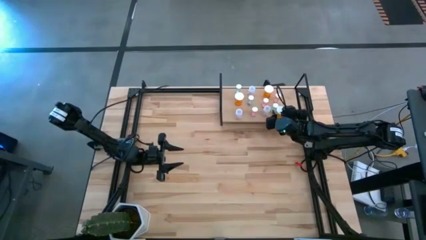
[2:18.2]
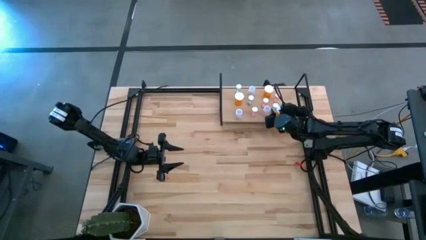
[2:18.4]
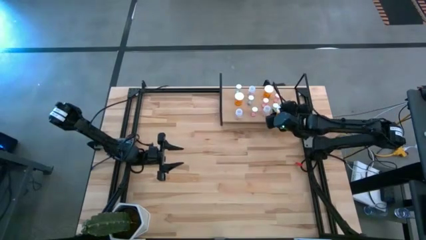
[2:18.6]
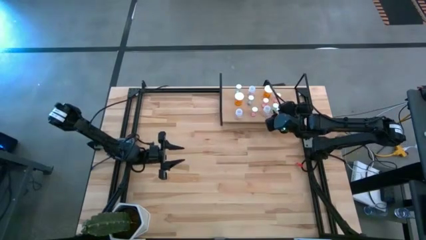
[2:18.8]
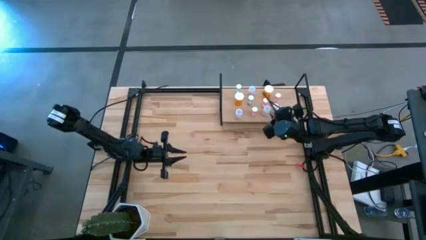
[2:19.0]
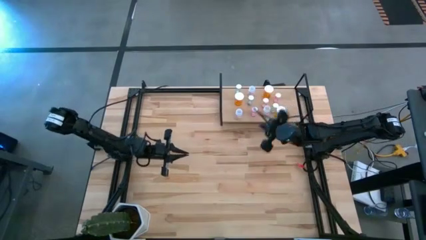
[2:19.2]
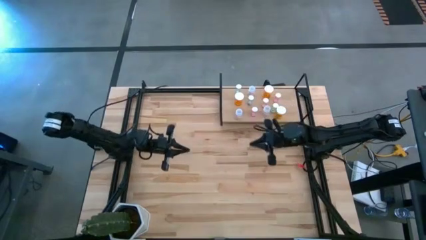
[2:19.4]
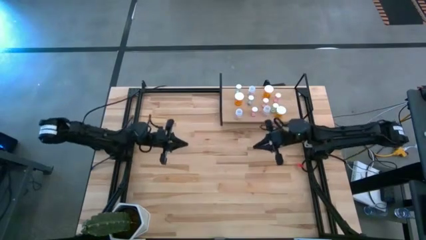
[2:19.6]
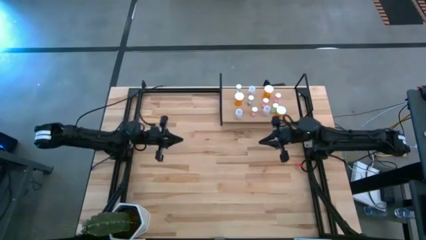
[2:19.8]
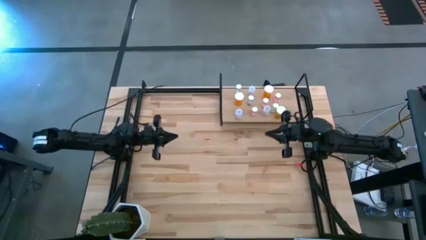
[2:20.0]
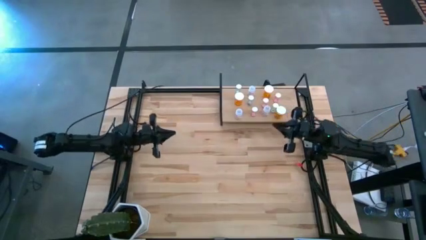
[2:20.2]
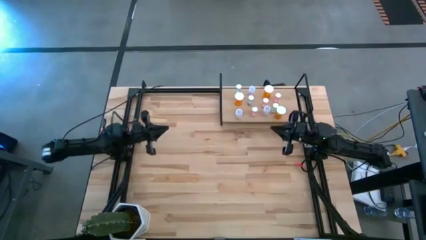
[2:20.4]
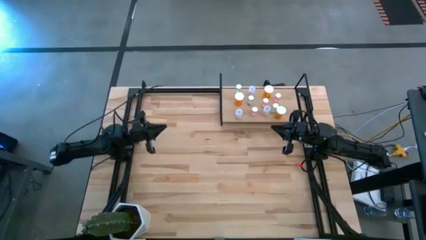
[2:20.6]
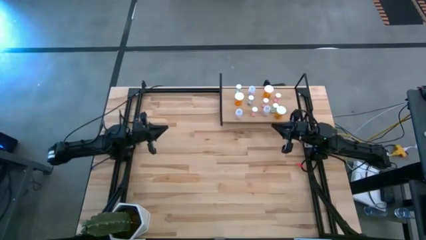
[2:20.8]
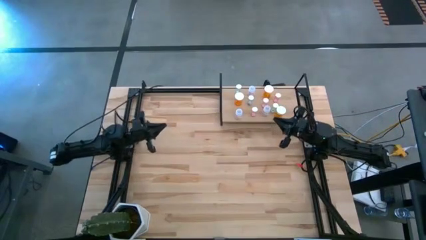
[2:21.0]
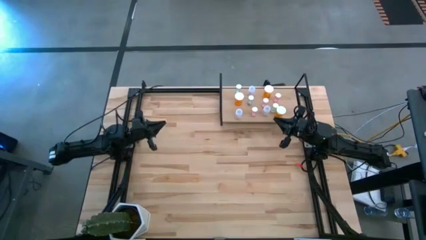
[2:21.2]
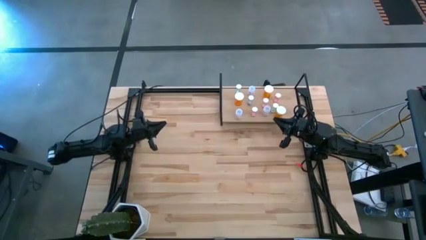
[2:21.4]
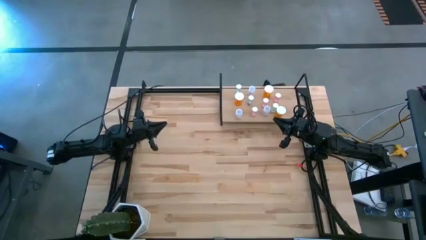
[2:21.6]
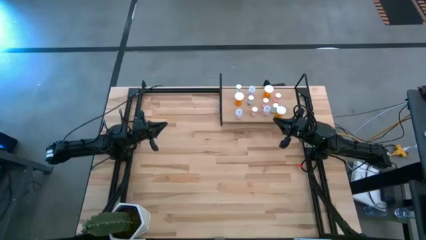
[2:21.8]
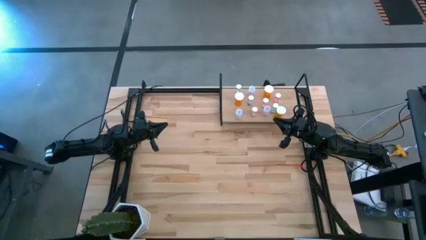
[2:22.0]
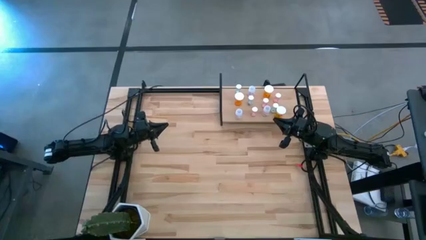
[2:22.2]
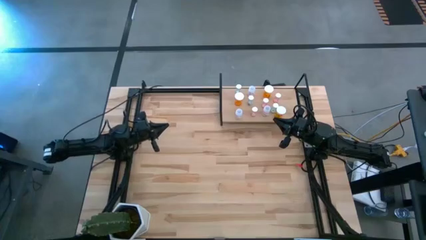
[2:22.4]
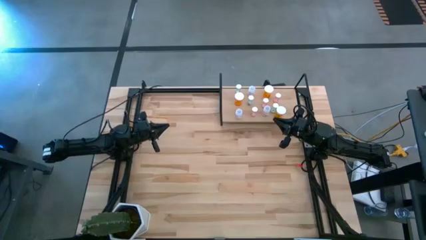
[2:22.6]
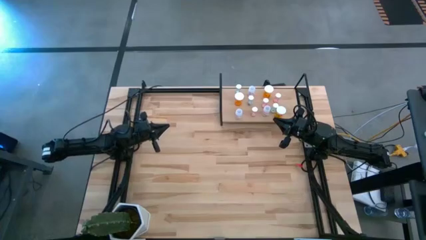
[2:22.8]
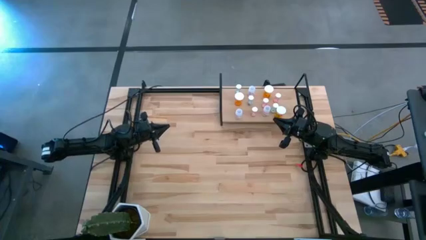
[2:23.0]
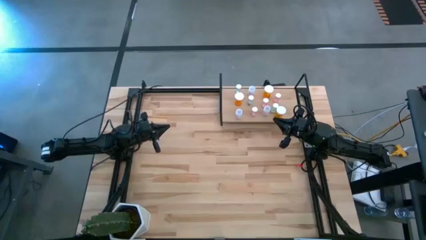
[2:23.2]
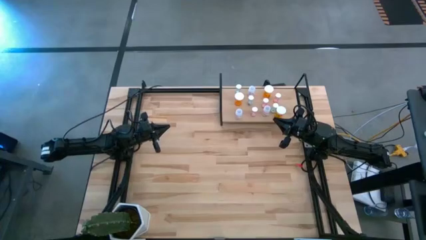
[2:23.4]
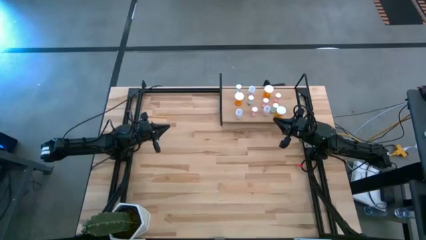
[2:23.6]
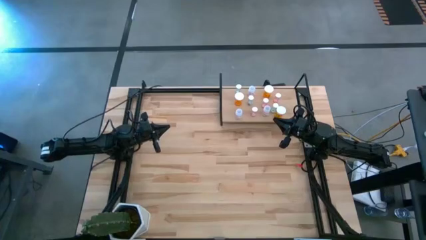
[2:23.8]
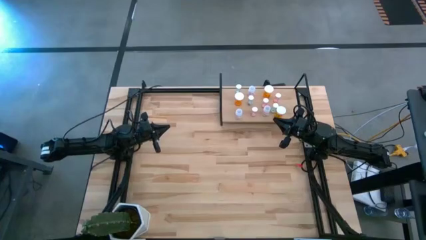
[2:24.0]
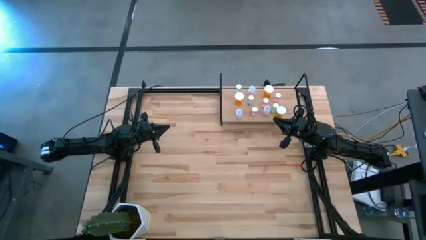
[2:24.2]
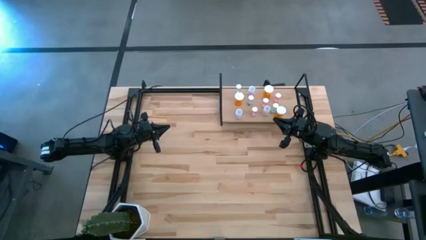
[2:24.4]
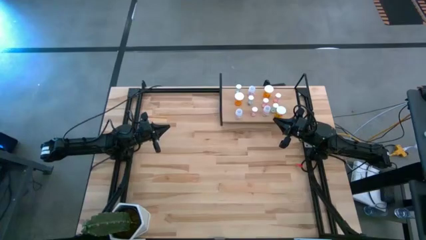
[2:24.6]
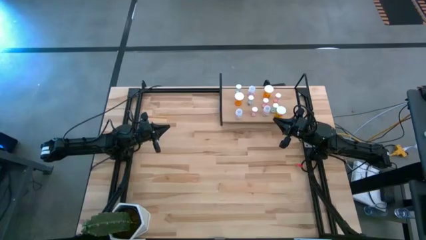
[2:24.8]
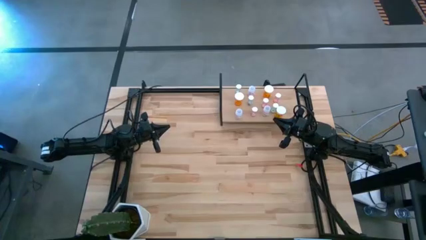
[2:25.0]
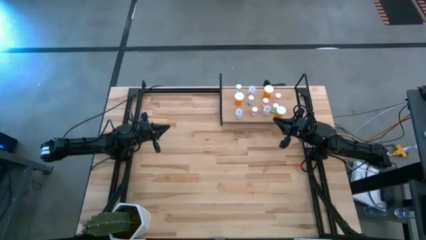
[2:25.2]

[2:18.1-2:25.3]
Task: Pick and place medicine bottles onto shelf by color
Return to Home Position

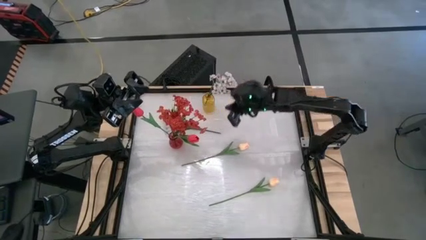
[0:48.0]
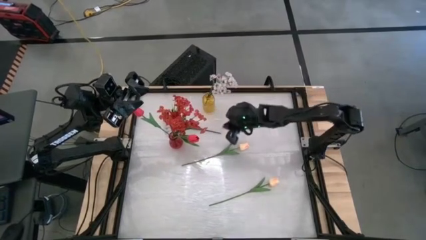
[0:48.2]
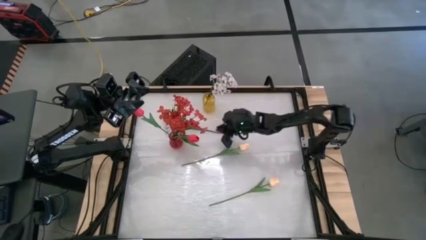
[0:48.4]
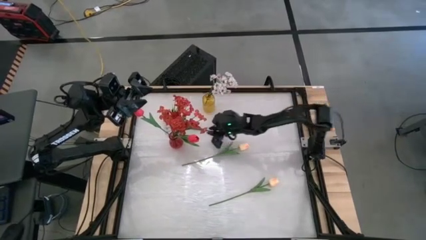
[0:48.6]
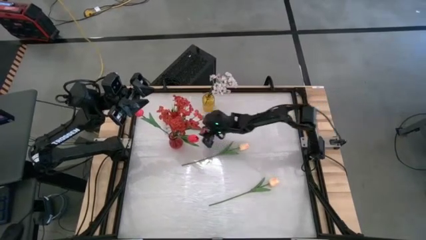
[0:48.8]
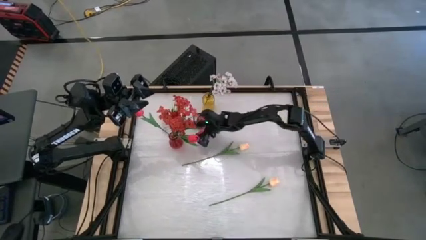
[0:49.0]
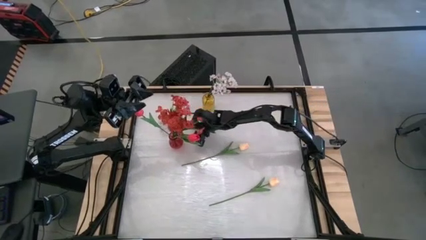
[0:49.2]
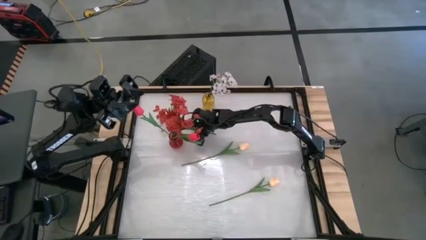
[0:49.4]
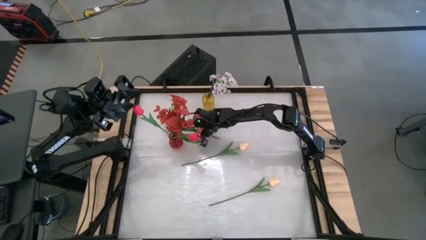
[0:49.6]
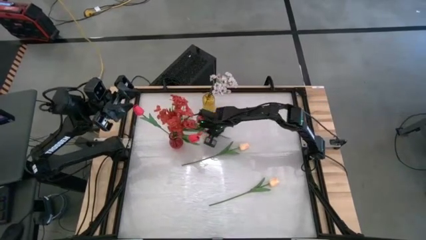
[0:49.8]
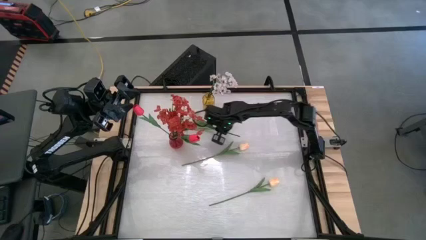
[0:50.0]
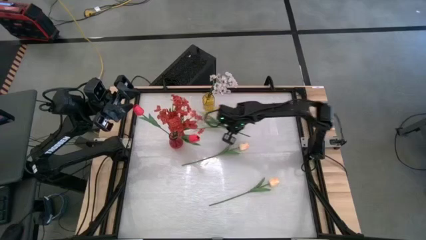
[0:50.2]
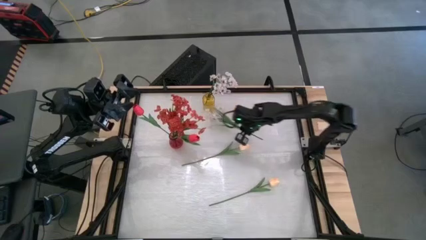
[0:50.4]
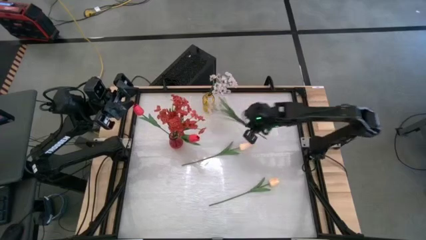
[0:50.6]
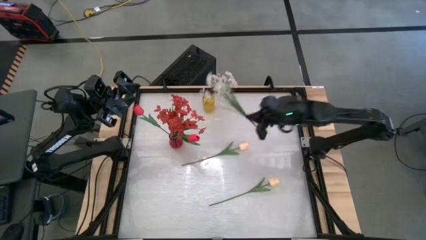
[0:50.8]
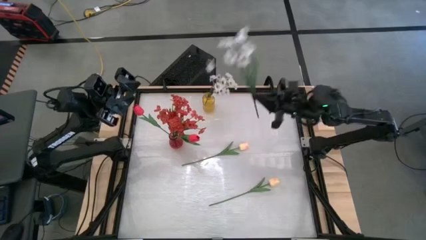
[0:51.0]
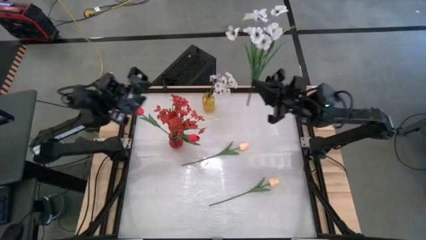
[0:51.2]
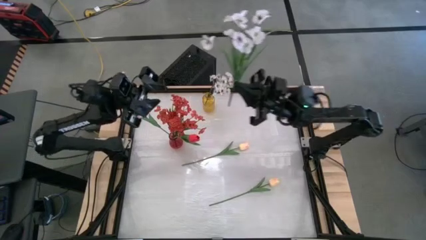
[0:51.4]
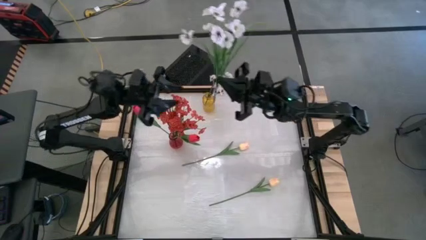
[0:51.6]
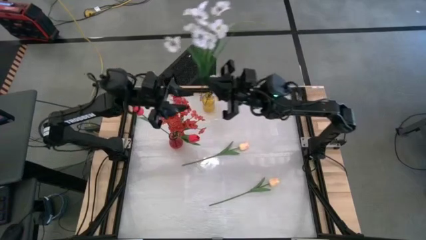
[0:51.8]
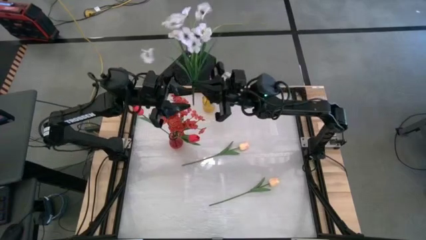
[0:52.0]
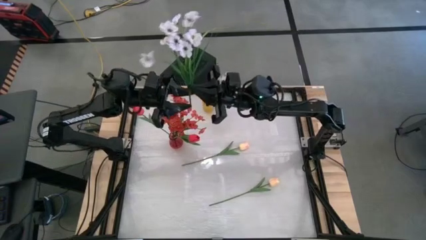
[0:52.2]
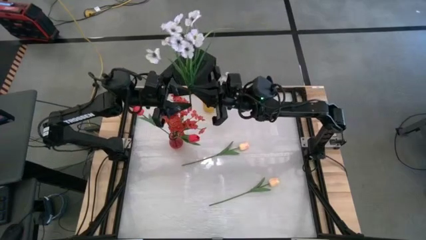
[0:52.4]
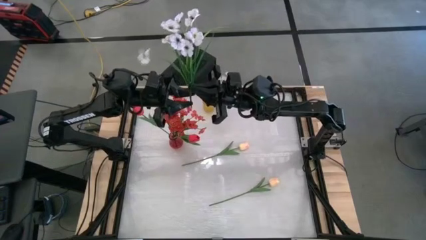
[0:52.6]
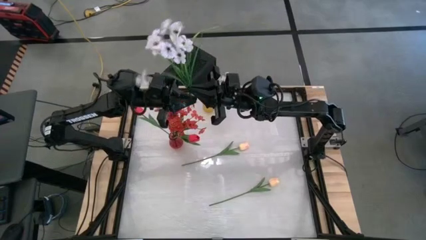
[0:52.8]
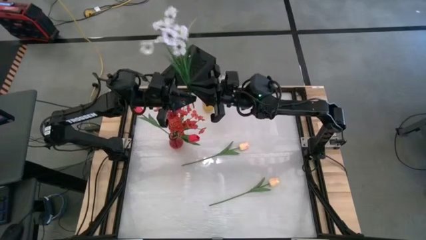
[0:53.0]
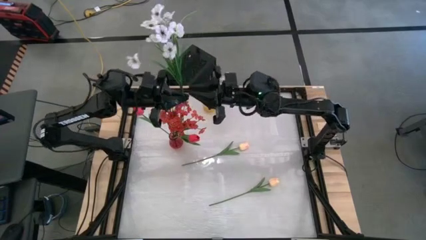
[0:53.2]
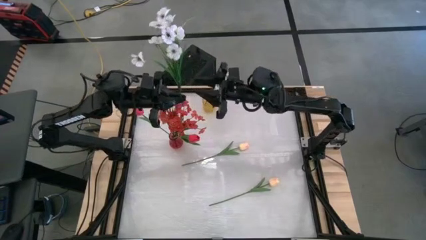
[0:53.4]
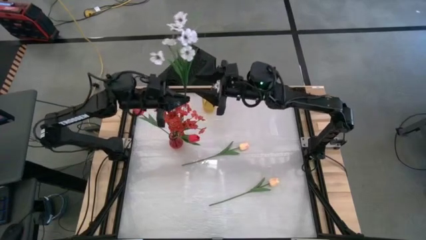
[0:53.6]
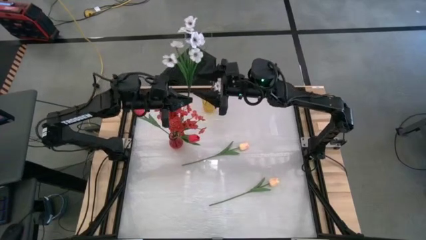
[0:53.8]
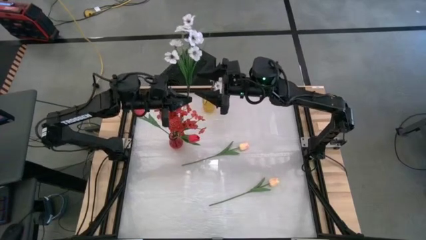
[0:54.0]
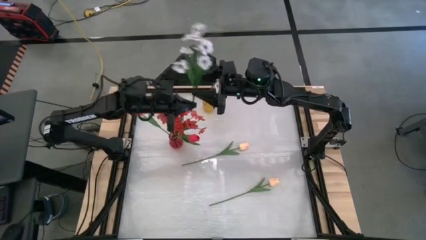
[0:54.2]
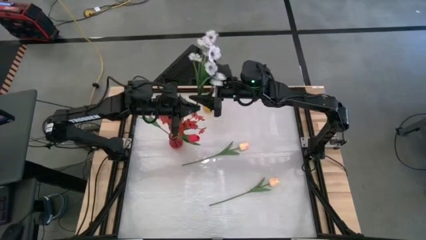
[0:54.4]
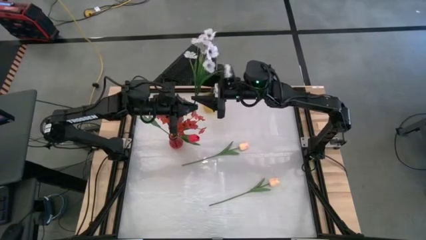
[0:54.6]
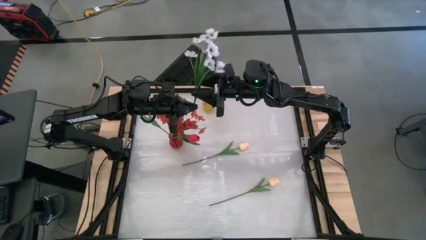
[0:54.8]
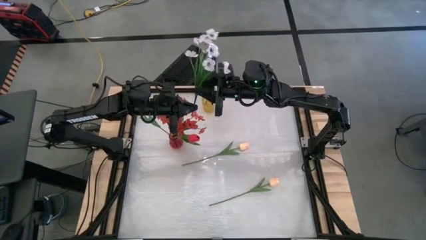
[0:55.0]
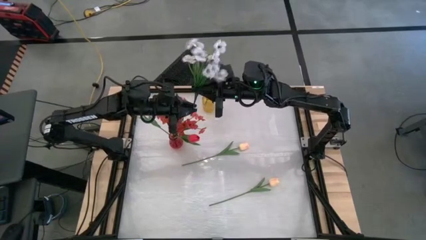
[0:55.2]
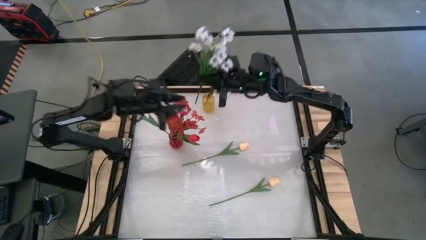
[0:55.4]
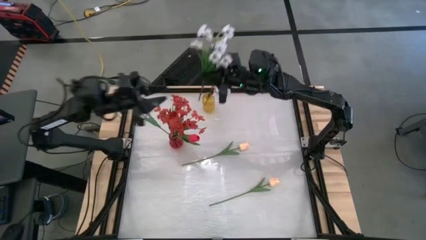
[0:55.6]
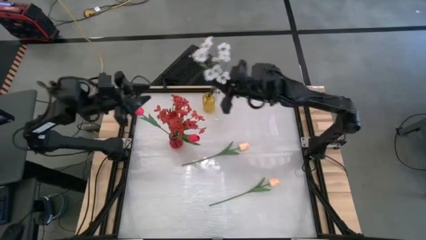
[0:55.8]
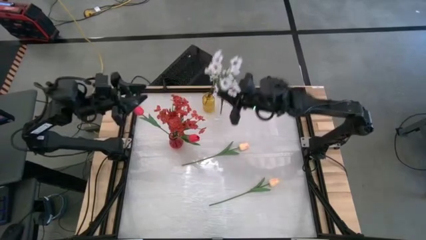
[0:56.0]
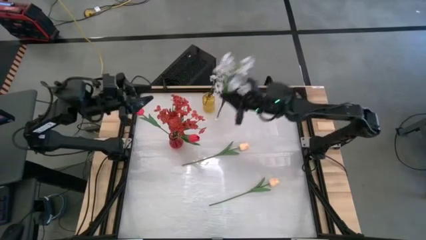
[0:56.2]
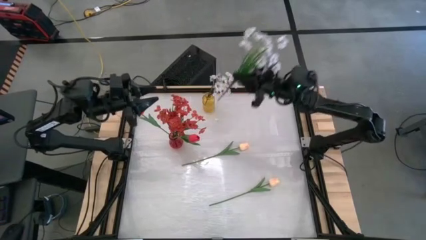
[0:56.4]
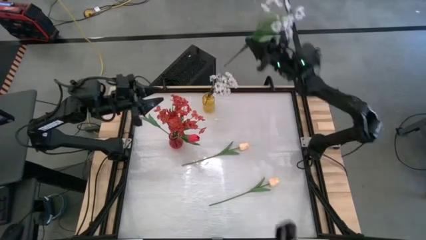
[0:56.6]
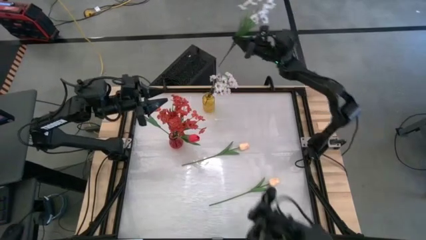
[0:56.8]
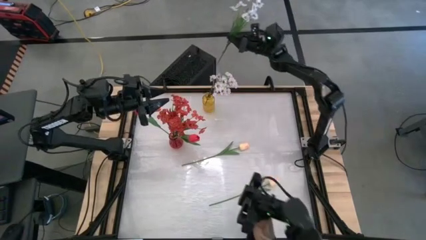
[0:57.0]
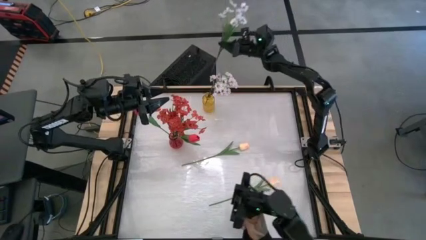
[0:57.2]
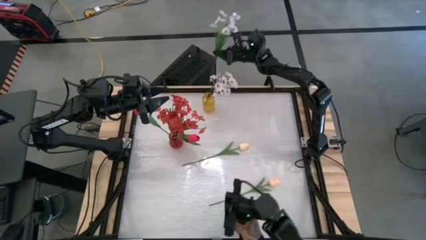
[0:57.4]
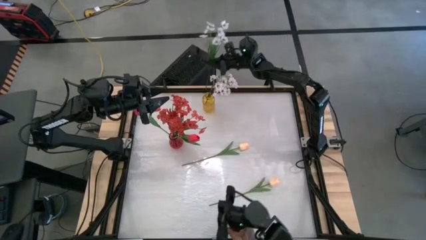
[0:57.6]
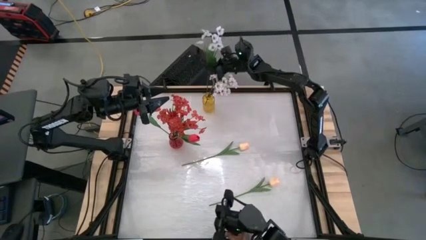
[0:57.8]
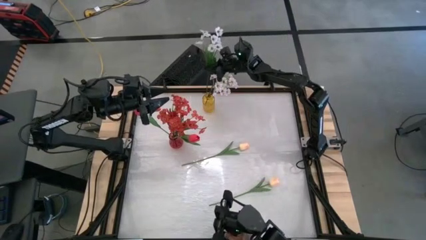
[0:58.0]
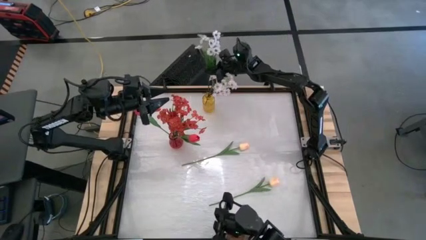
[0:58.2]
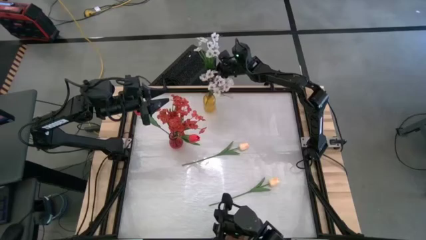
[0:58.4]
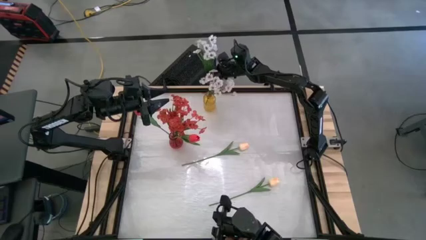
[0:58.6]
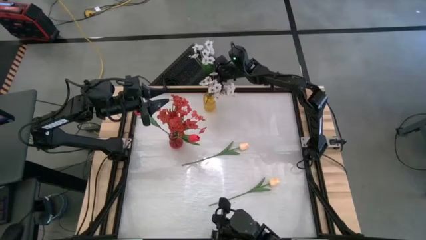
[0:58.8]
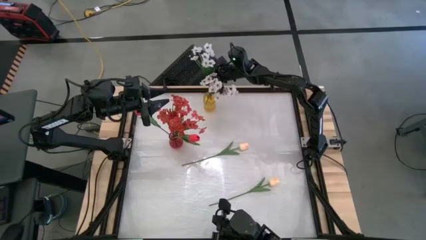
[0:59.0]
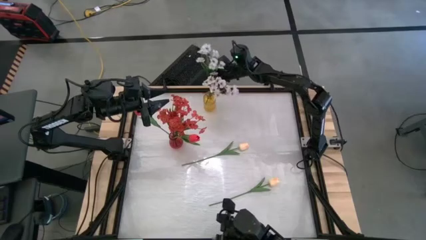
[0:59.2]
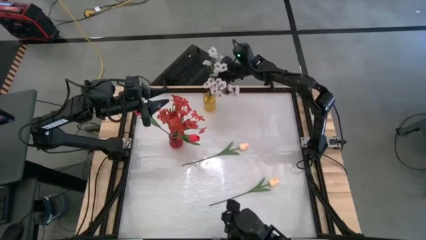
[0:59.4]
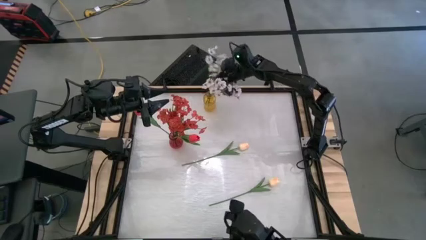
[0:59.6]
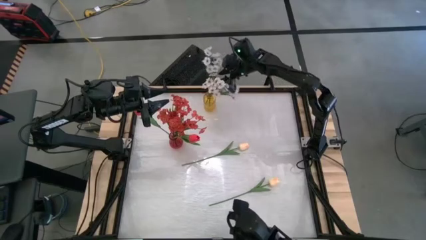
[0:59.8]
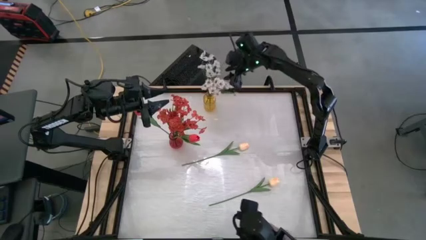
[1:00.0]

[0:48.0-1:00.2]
Task: Sort flowers into vase by color
Put the white flowers into the yellow flower vase
